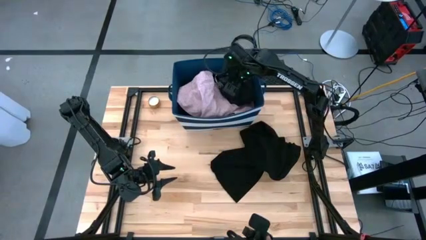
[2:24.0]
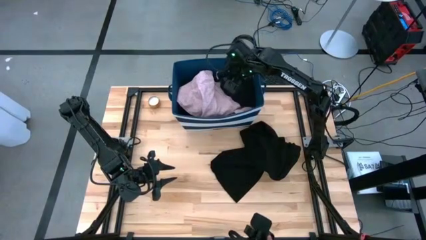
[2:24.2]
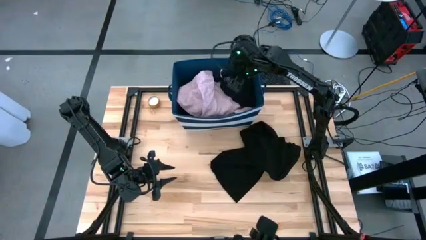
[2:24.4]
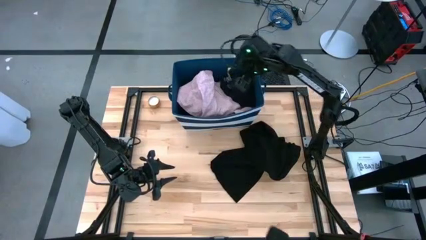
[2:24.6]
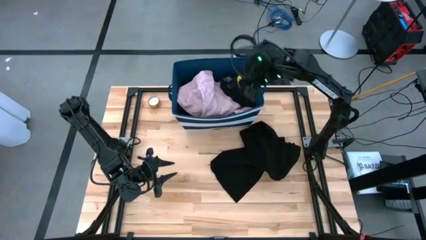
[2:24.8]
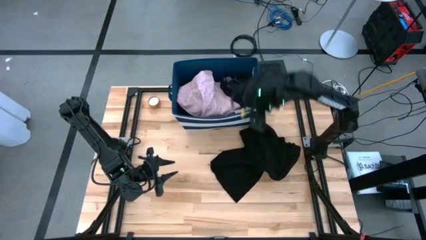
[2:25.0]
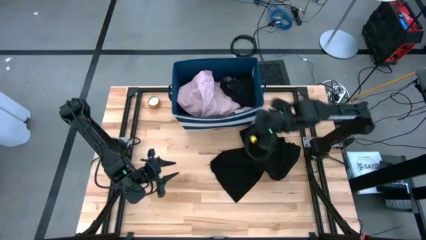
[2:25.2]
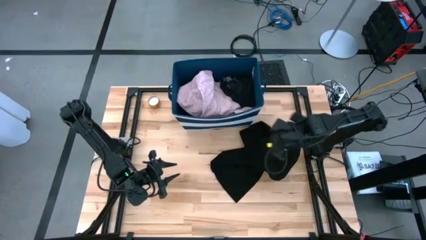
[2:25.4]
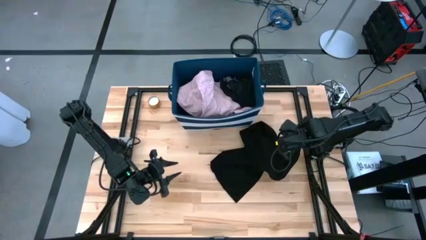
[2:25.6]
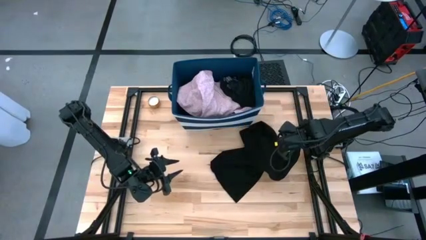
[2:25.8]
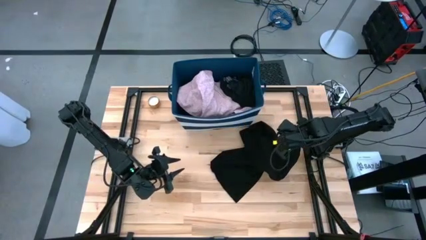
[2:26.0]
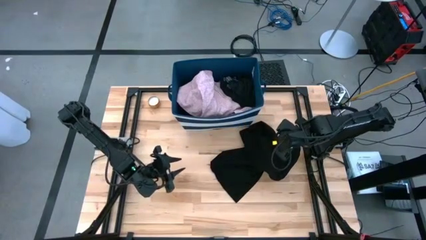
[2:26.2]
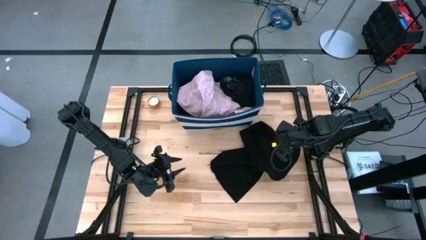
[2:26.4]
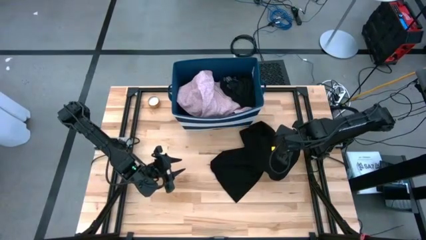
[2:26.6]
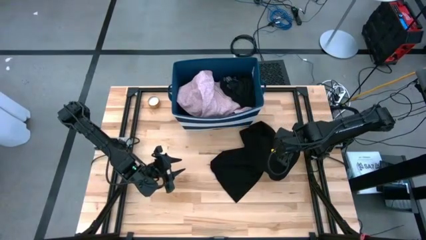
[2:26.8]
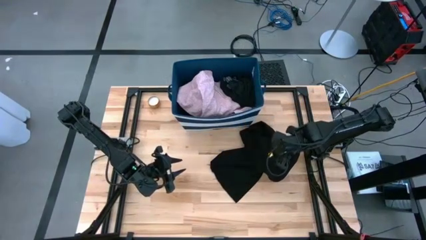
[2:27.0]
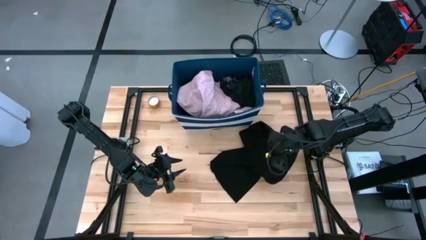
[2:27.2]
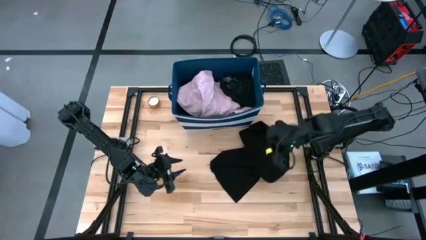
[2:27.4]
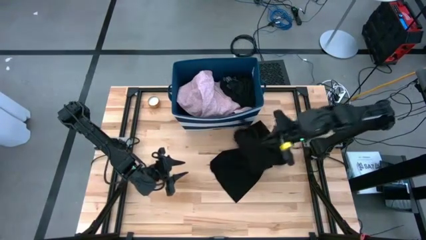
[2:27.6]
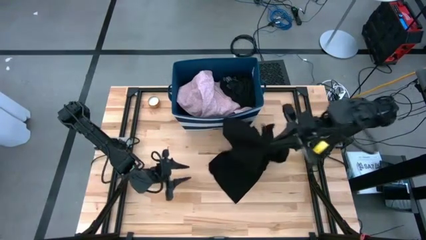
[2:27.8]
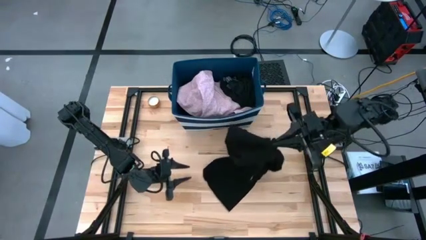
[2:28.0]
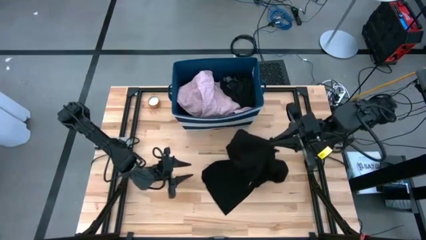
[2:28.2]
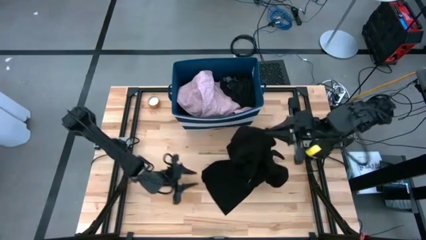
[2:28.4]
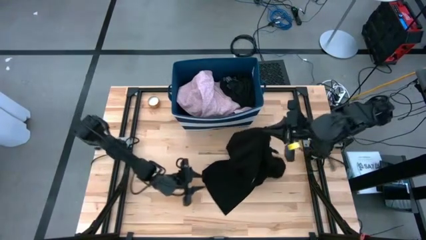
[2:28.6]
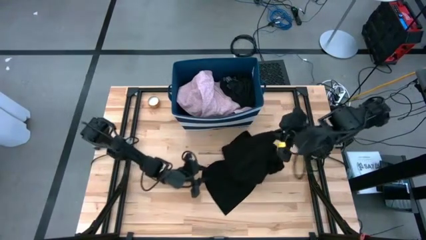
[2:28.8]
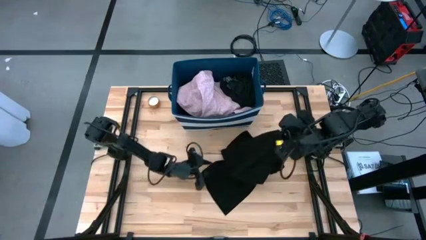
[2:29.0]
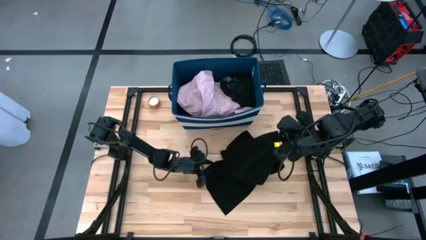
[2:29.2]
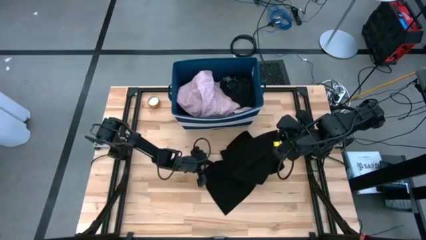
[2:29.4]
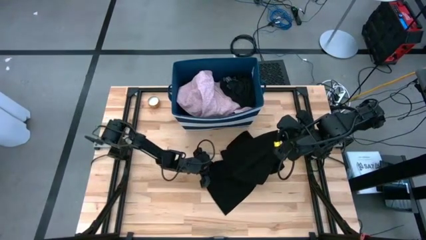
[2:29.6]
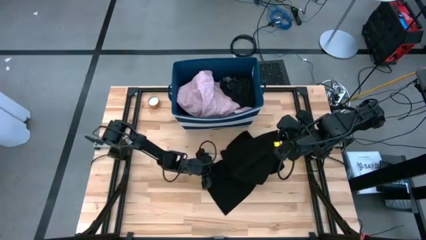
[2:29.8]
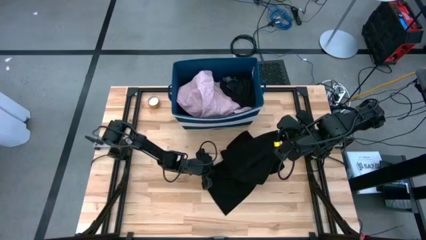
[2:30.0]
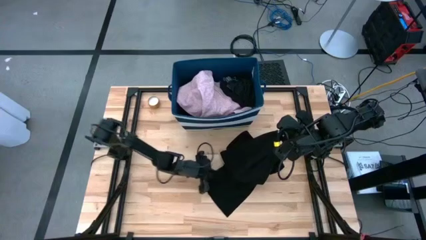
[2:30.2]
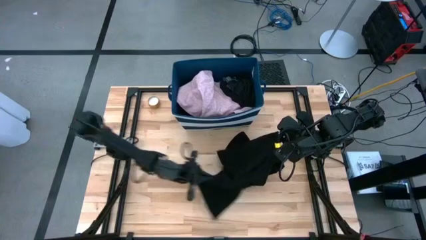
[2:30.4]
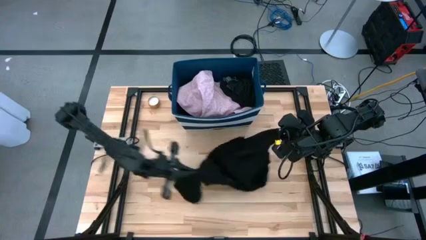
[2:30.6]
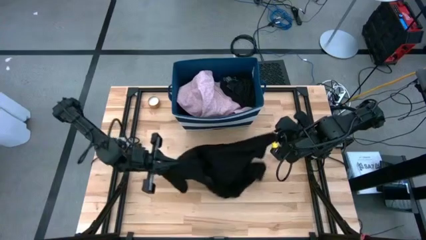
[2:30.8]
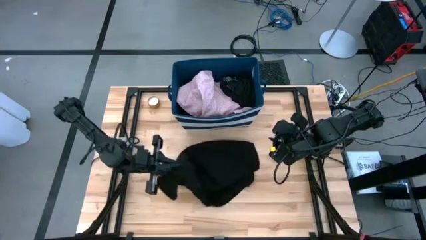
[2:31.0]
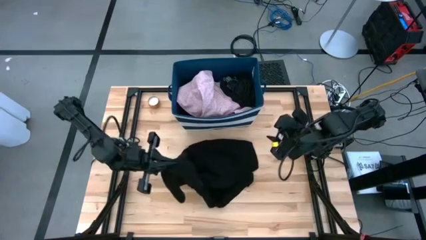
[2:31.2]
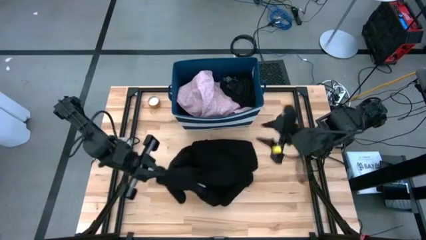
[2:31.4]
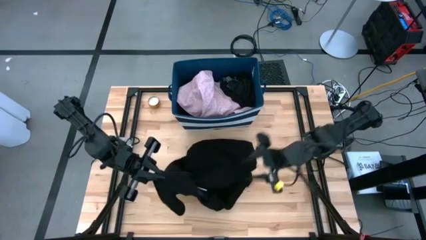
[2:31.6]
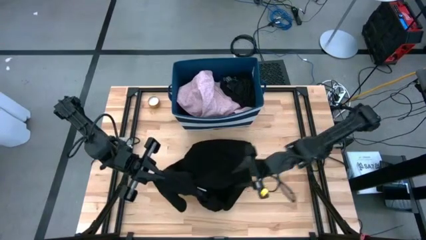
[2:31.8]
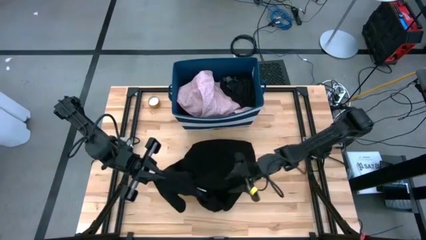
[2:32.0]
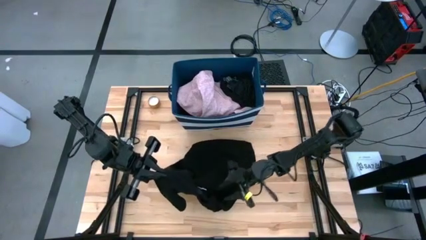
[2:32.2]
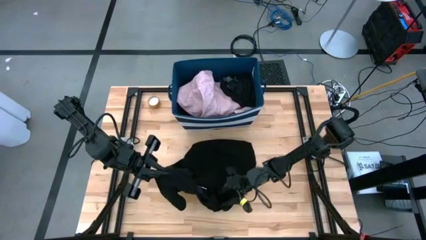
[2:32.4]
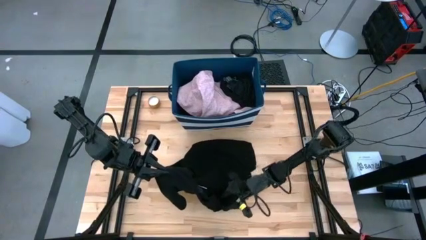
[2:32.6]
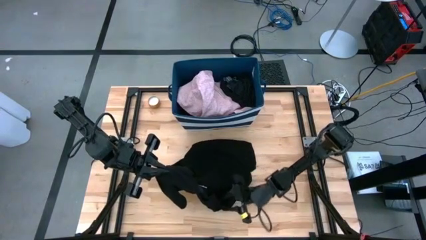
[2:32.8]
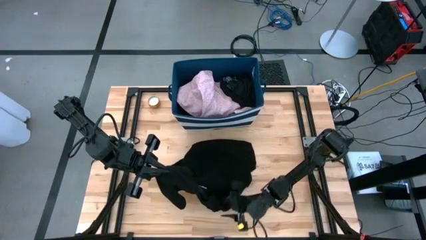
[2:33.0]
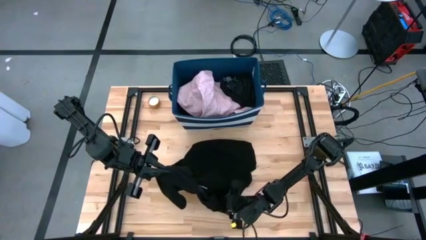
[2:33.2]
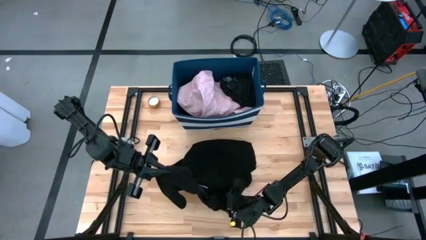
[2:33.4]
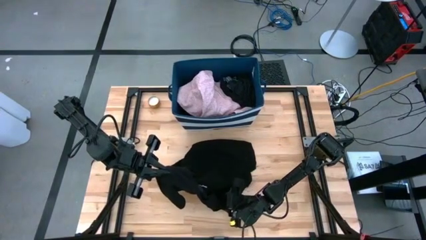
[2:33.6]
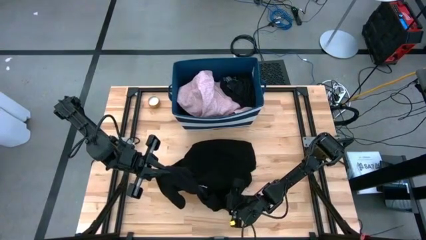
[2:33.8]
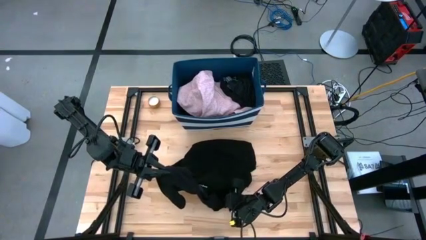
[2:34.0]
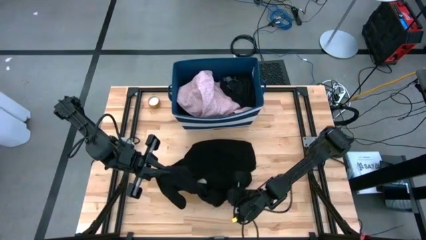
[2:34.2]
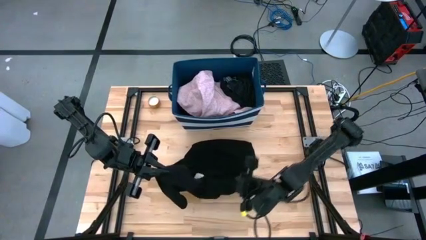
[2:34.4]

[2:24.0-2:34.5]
Task: Sort clothes
Fold the black sweatshirt

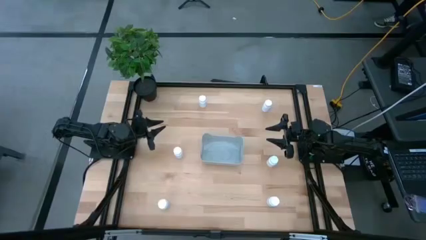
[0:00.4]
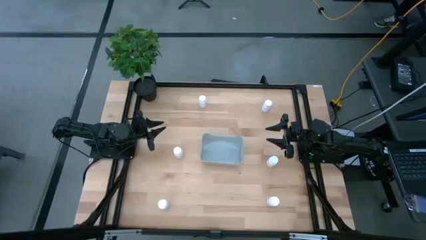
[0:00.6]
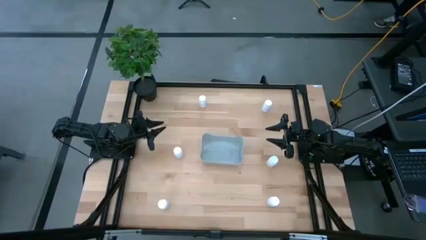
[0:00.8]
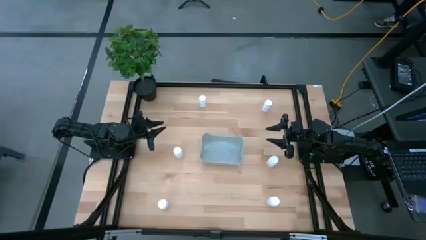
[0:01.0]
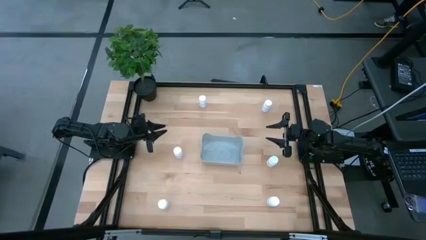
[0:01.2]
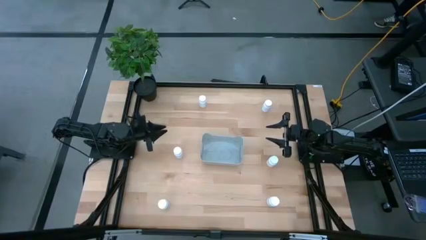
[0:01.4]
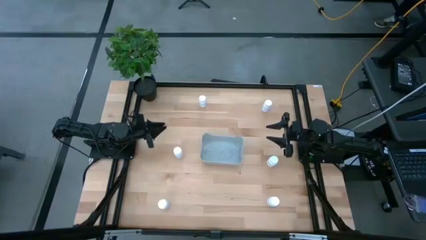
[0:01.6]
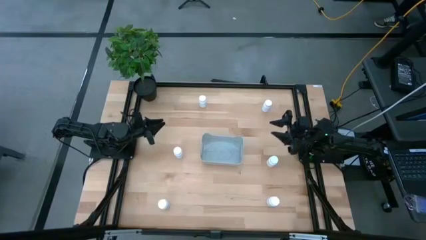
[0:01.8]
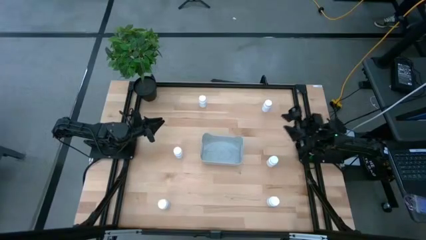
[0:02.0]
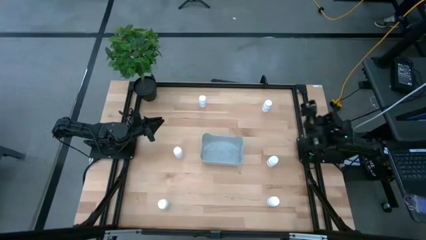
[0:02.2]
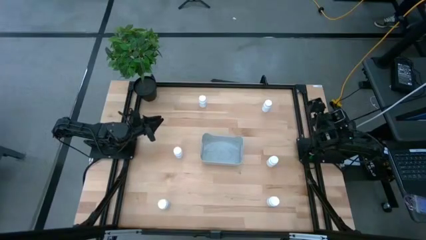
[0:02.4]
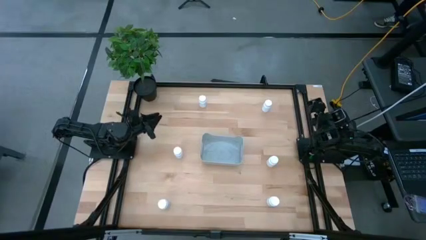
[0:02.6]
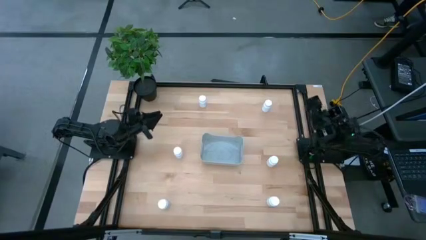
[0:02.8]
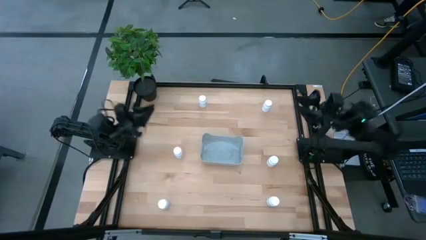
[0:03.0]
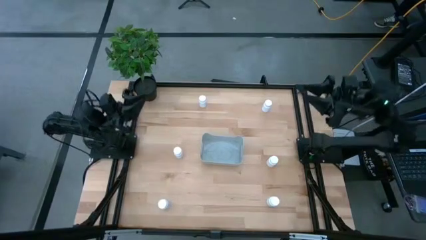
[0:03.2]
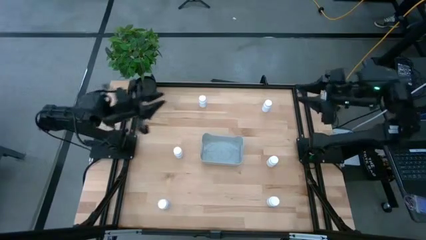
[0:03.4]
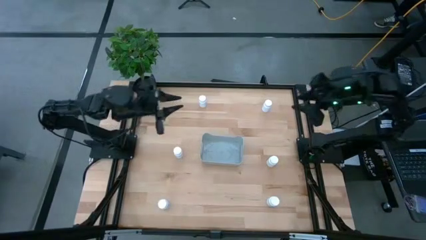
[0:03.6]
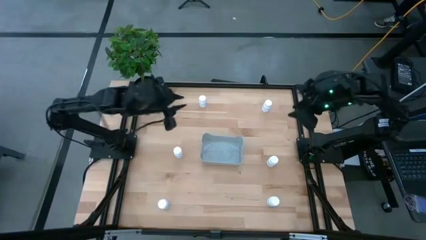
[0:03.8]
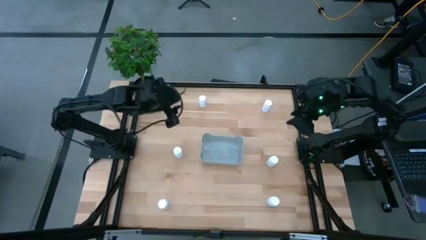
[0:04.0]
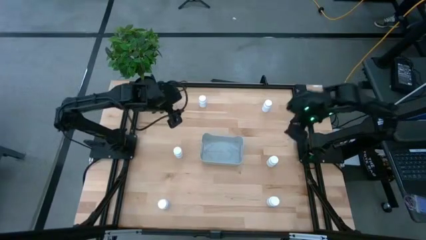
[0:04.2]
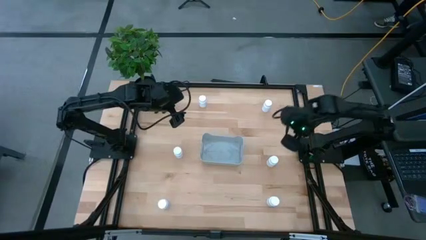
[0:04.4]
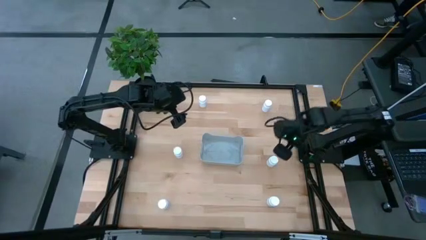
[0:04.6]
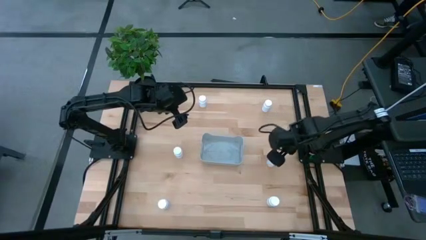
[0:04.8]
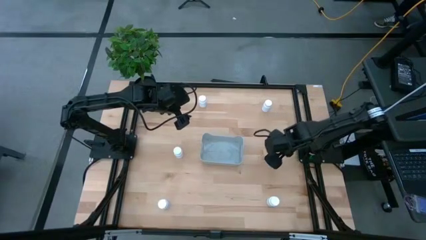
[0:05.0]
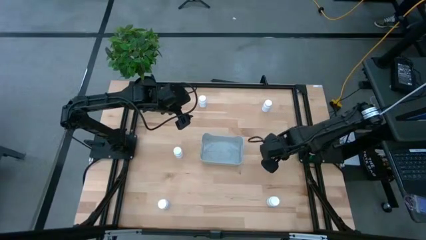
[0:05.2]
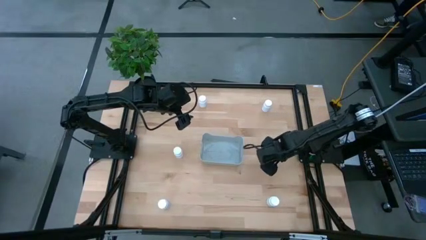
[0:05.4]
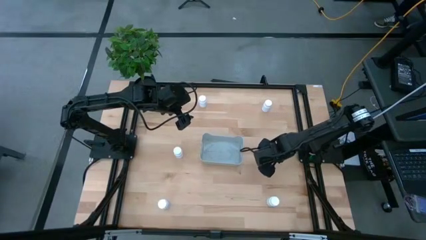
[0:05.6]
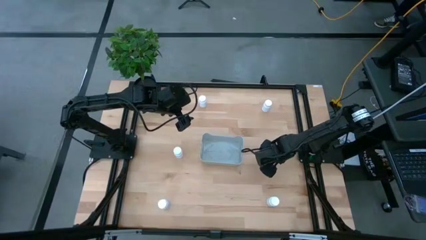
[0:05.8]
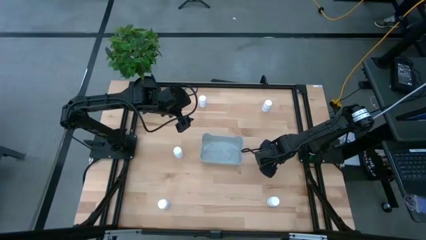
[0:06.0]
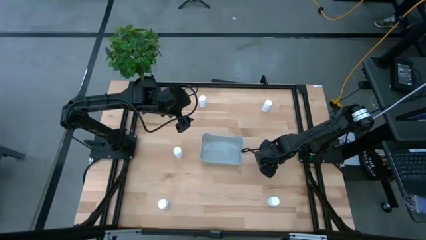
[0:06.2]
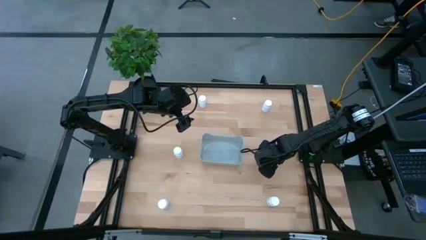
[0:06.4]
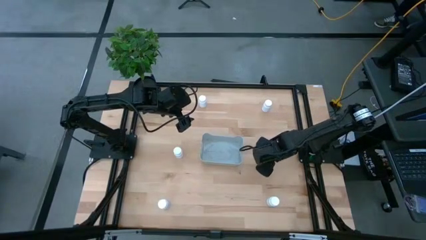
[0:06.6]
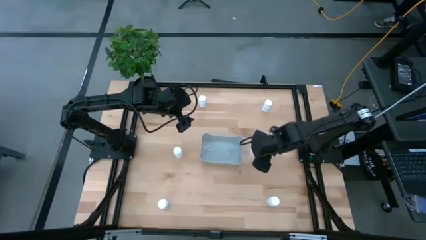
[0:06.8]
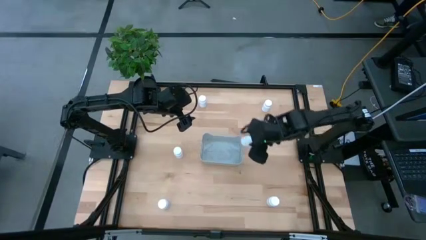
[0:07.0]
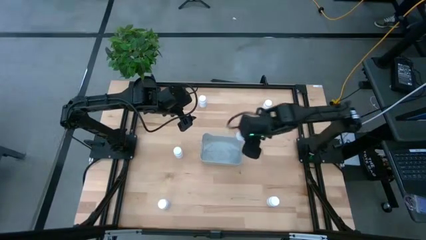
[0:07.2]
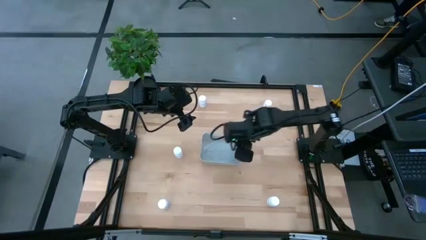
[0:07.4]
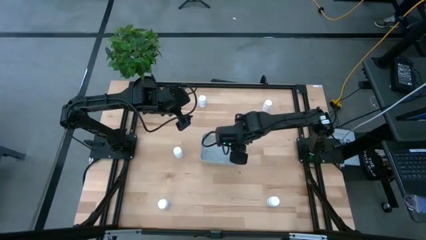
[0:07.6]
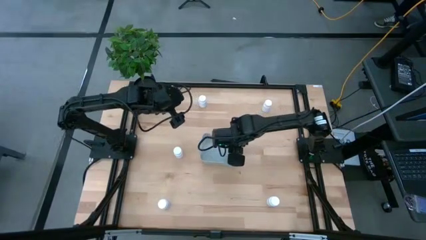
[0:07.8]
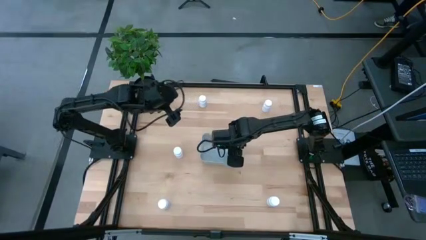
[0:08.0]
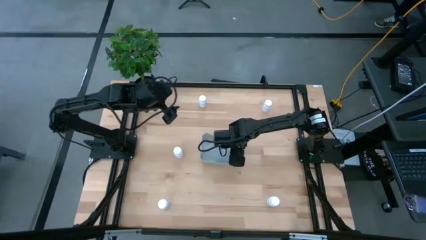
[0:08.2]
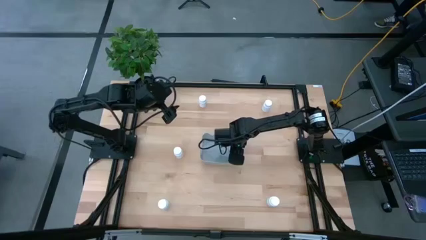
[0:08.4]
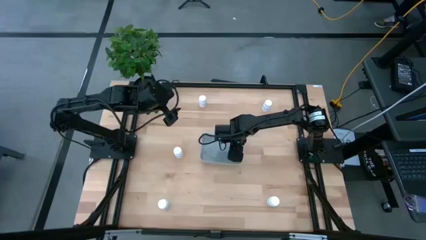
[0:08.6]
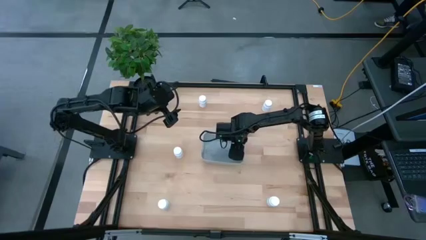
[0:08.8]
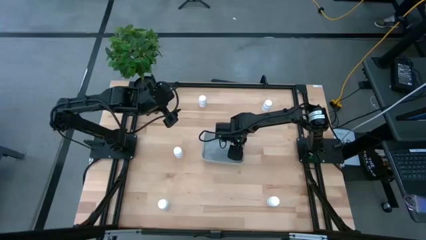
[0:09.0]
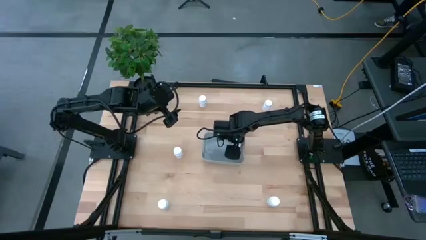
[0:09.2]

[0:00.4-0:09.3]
Task: Pick and place pill bottles into a basket
Put the white pill bottle into the gray bin
